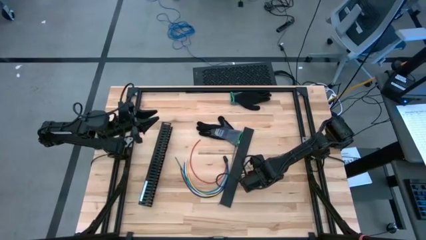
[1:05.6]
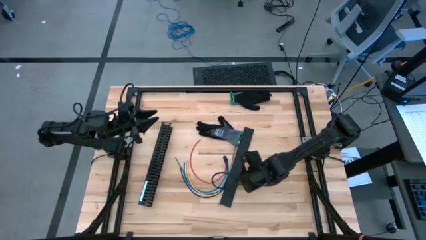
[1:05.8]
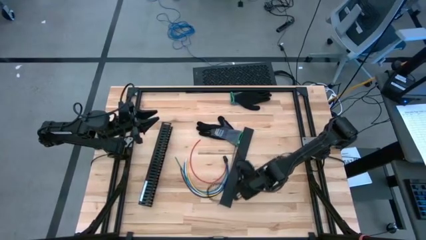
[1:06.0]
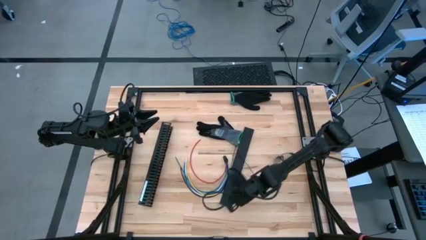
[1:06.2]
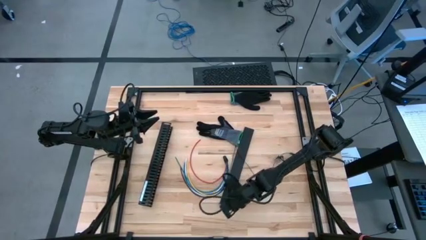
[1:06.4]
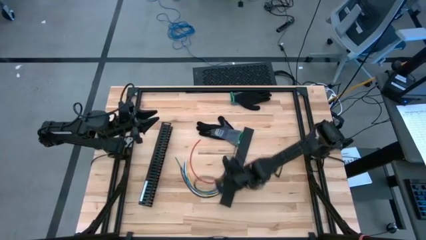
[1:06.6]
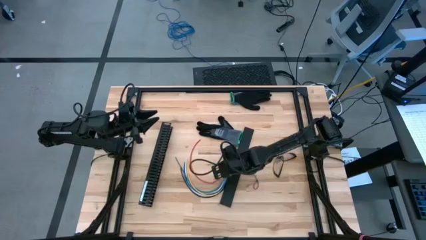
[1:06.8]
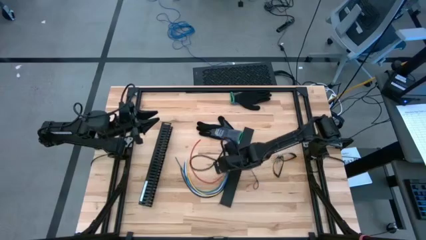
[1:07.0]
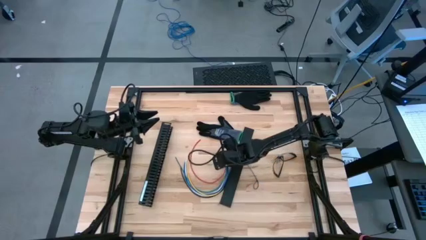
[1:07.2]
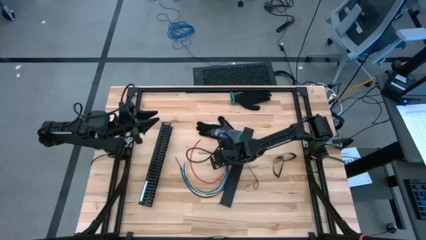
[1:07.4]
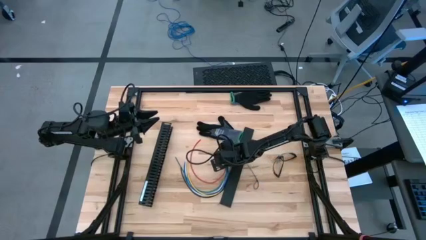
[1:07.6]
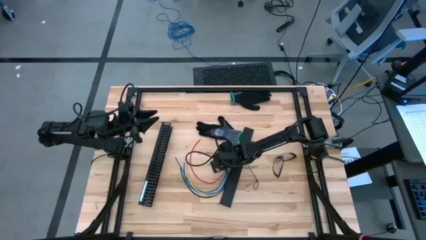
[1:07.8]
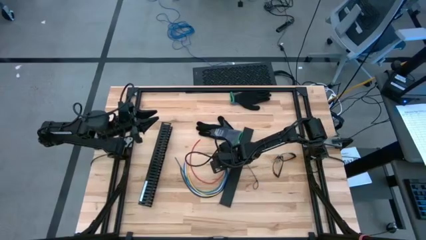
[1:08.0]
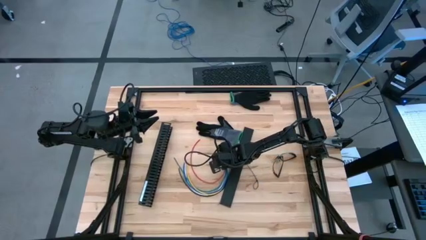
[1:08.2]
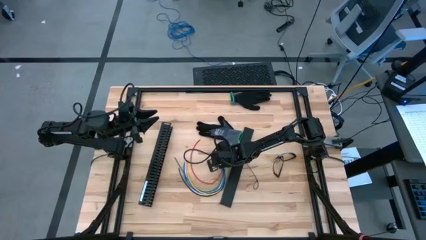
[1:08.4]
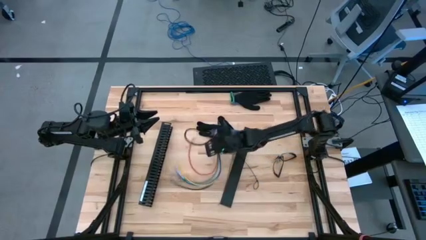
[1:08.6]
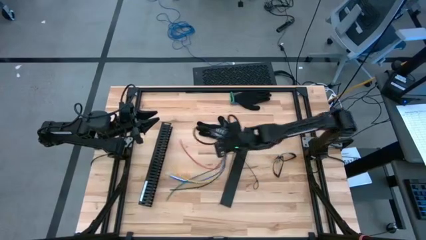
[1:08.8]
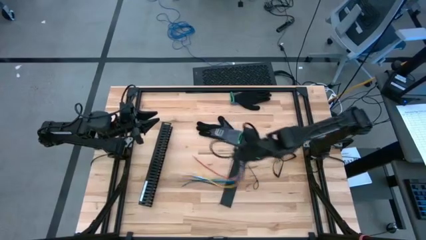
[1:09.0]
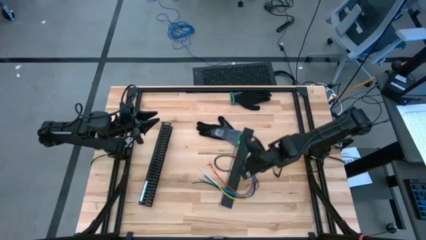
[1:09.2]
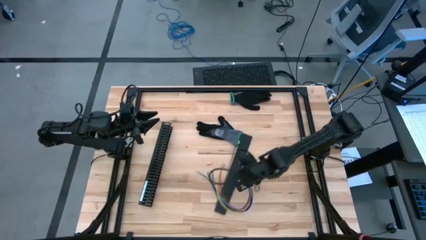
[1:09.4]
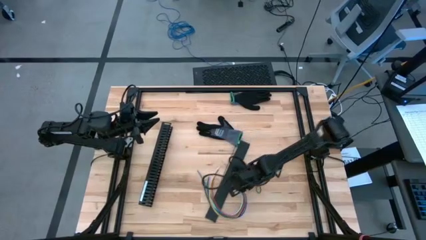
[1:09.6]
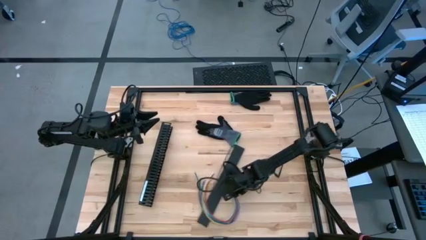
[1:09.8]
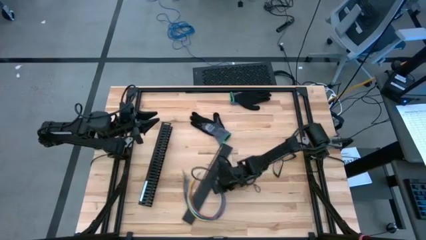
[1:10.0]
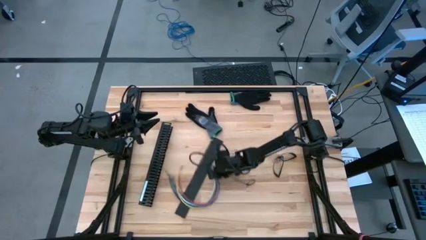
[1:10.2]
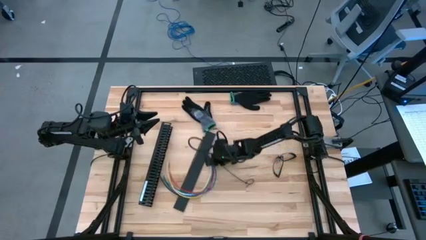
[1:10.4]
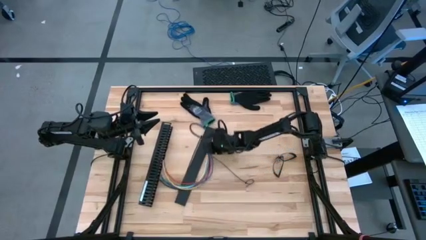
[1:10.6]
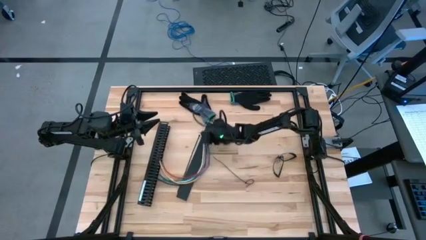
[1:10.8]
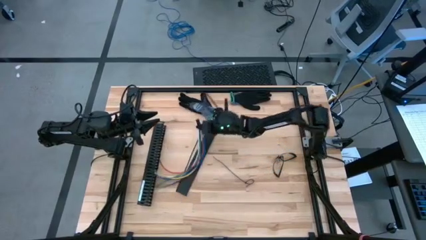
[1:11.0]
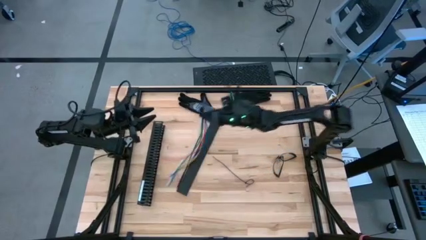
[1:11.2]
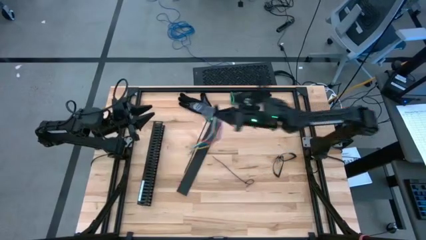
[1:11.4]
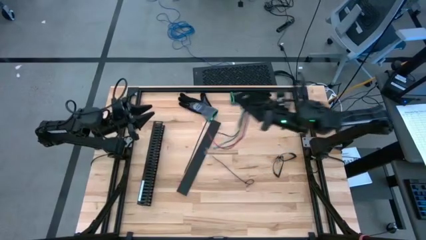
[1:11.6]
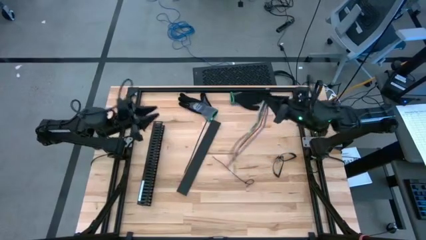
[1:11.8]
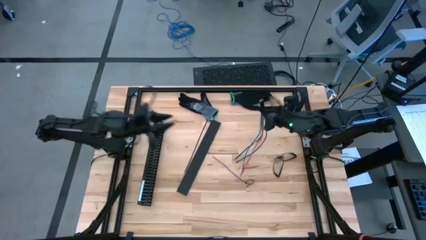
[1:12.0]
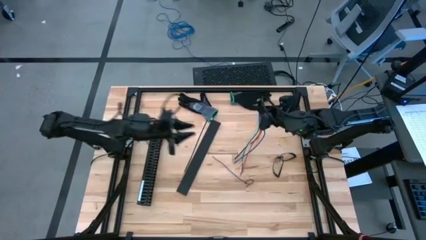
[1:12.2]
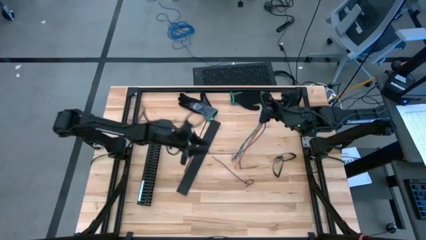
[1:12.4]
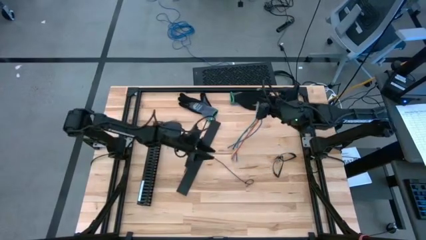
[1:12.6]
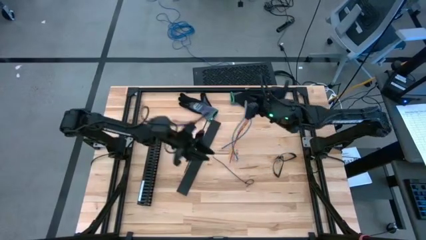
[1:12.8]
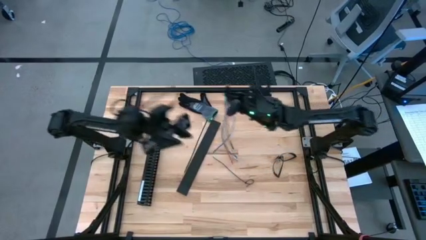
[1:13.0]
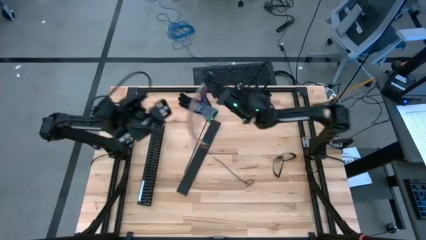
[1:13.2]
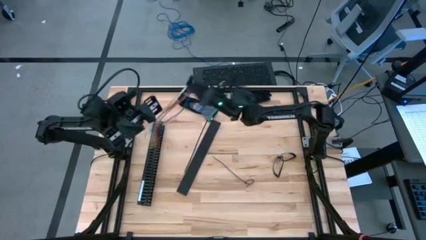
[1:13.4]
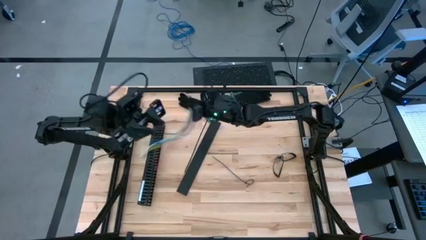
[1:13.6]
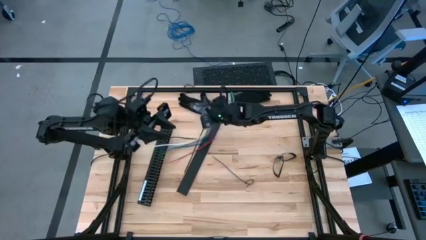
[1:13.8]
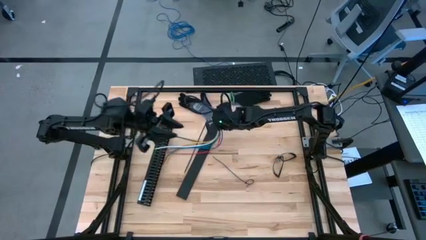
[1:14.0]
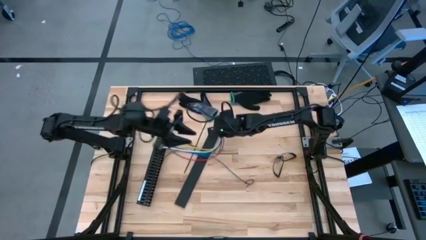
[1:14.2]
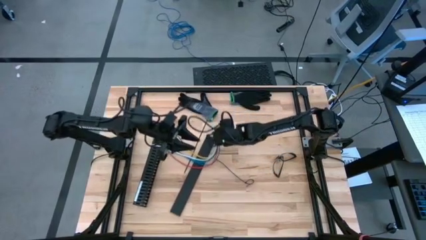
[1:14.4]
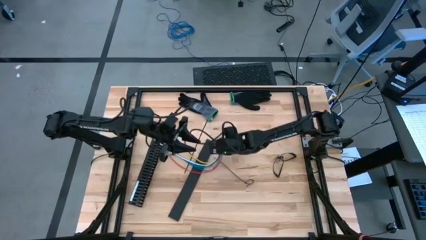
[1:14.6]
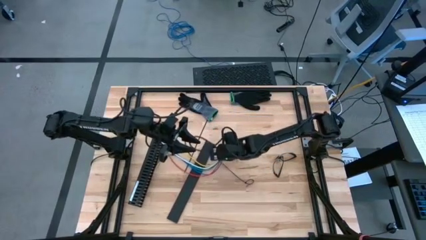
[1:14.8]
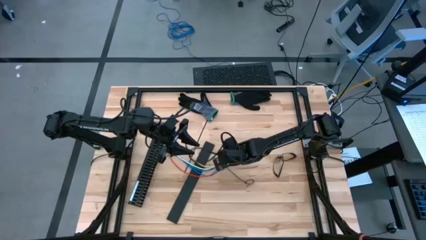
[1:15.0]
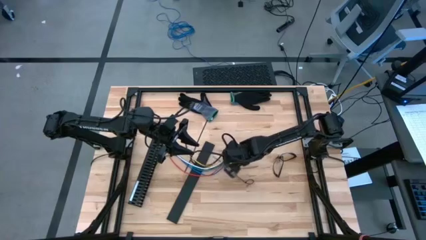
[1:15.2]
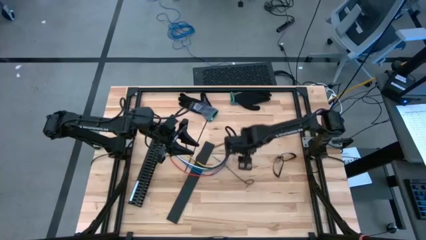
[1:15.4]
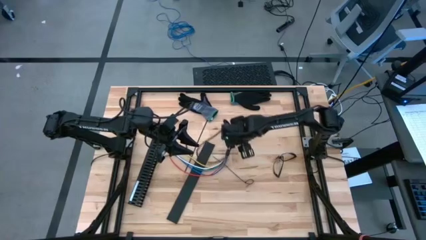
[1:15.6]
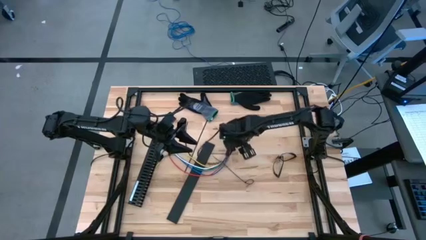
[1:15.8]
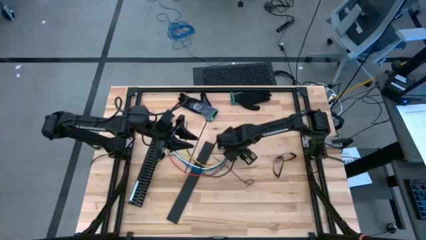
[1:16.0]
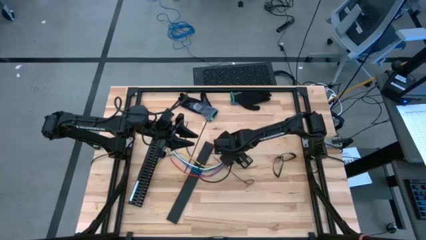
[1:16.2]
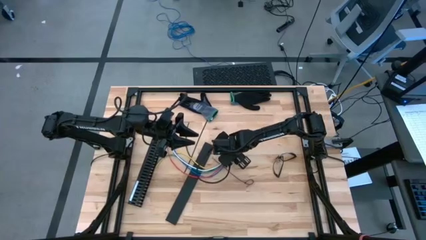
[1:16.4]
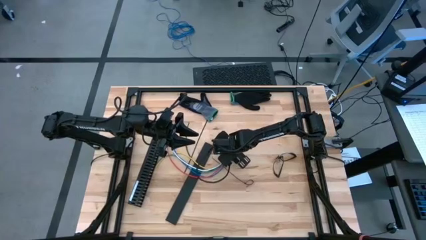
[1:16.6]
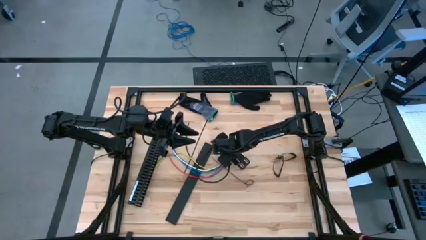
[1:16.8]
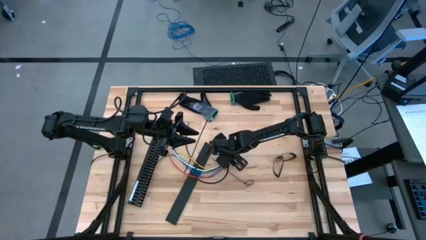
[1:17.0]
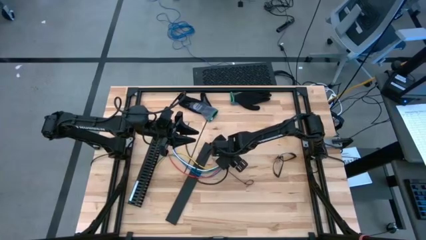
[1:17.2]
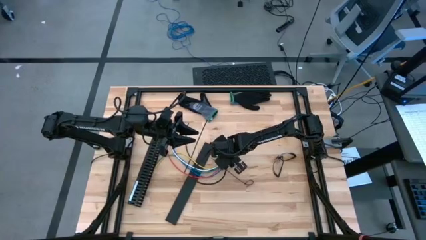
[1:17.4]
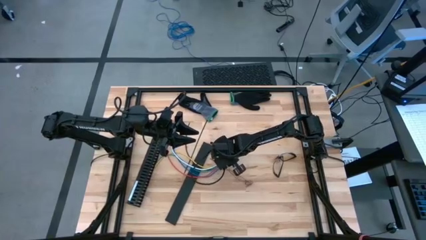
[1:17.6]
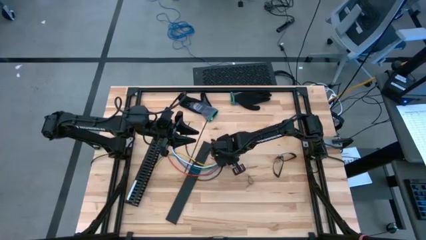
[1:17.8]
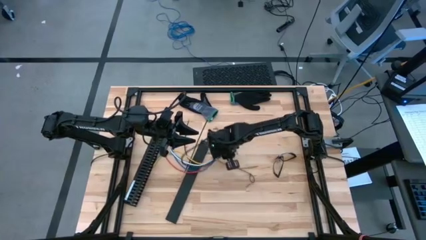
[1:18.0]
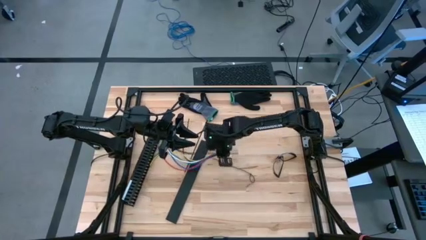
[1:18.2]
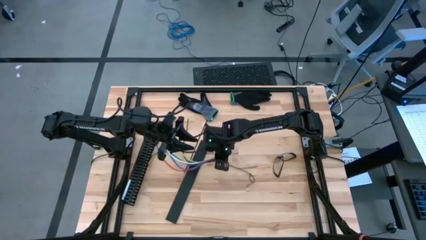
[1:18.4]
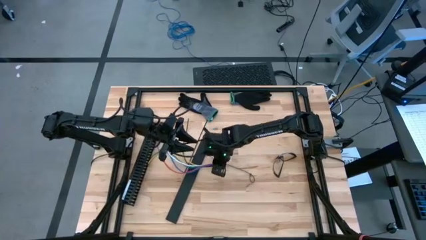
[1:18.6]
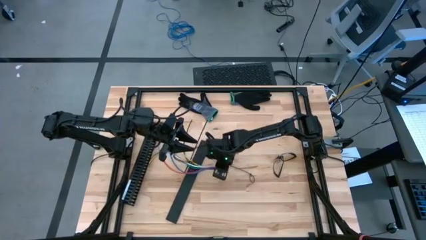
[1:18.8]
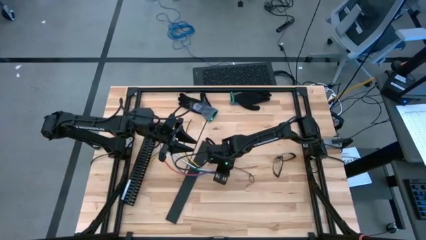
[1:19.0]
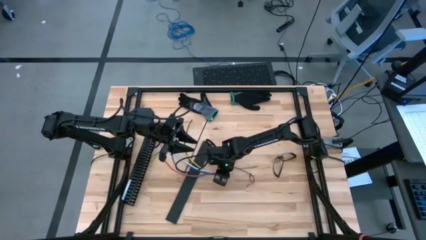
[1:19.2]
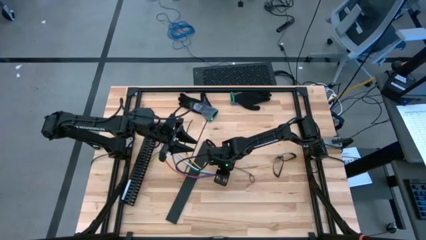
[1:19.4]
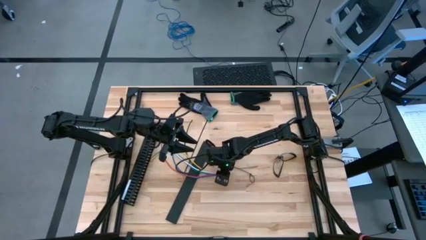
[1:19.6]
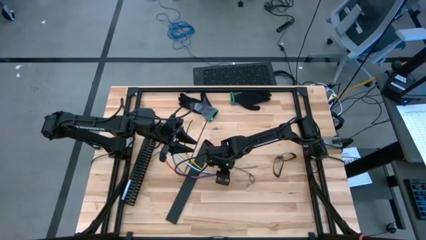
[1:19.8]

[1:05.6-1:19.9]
Task: Ziptie cables
Put the cable wire on the table
